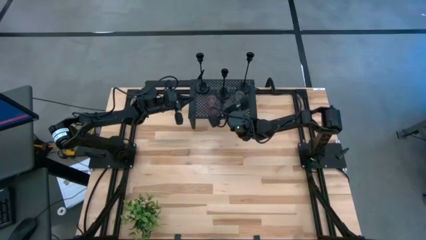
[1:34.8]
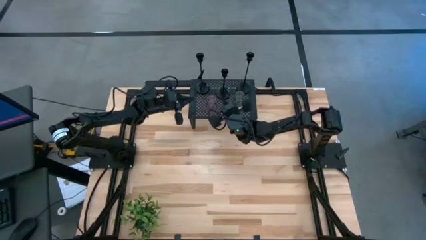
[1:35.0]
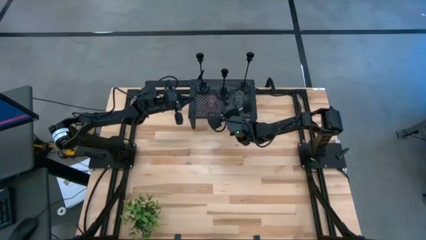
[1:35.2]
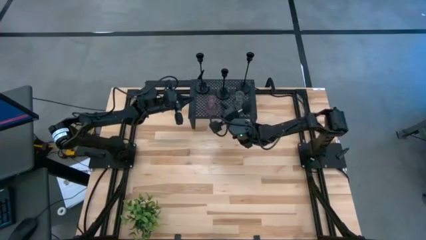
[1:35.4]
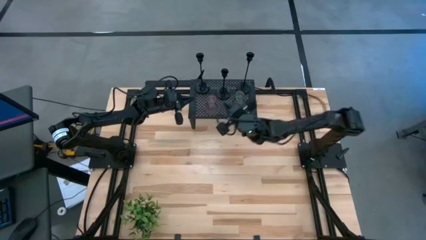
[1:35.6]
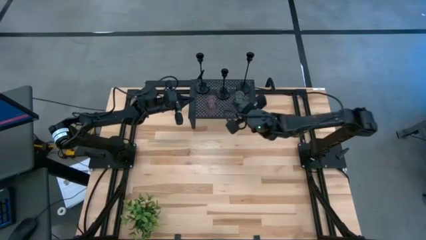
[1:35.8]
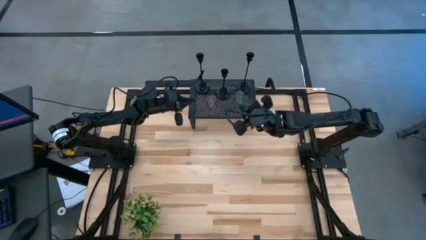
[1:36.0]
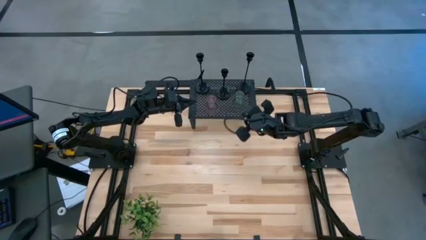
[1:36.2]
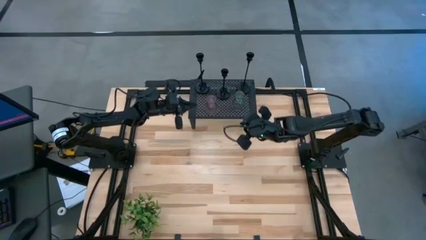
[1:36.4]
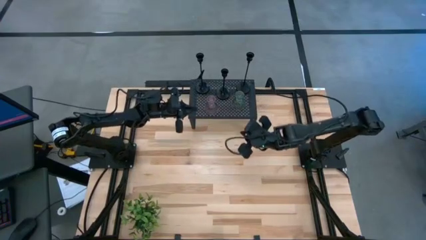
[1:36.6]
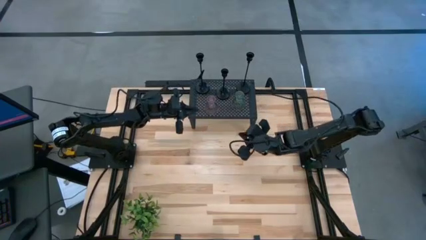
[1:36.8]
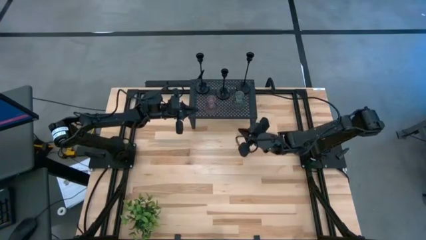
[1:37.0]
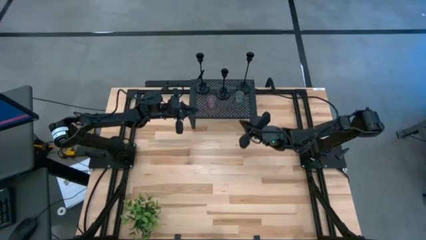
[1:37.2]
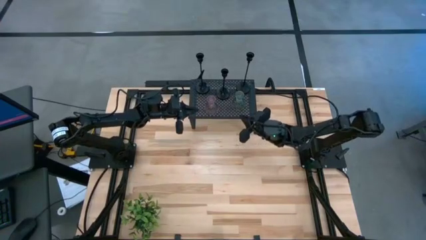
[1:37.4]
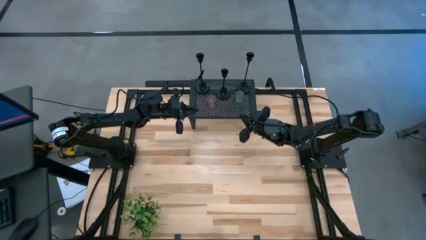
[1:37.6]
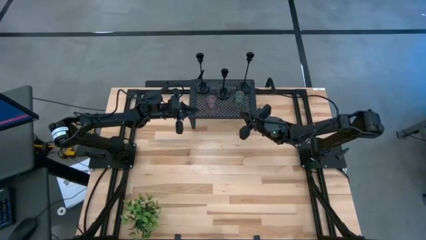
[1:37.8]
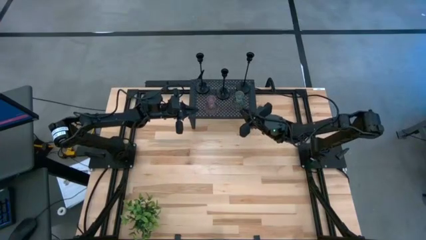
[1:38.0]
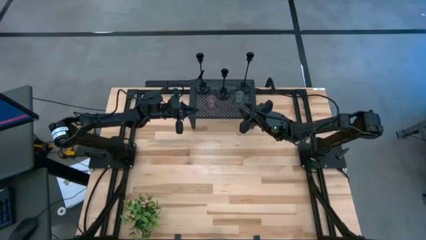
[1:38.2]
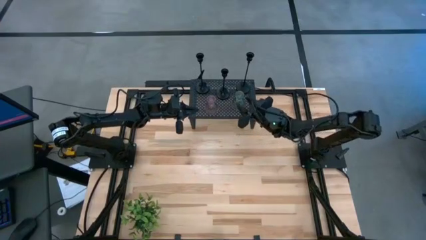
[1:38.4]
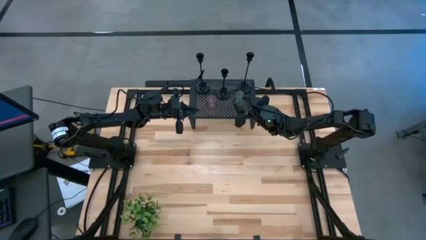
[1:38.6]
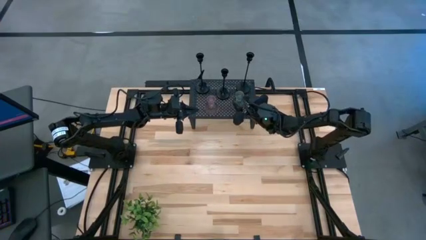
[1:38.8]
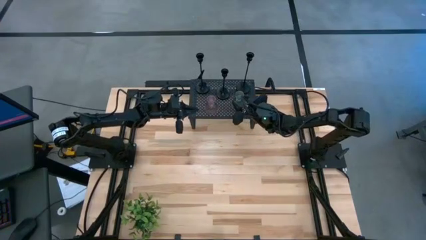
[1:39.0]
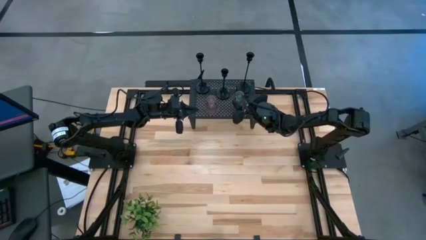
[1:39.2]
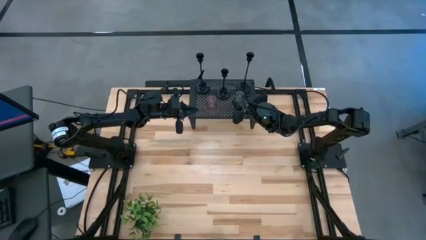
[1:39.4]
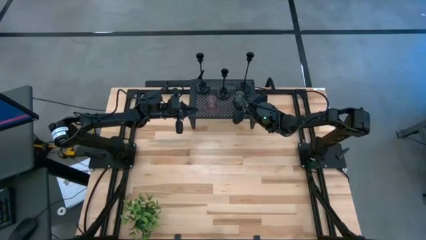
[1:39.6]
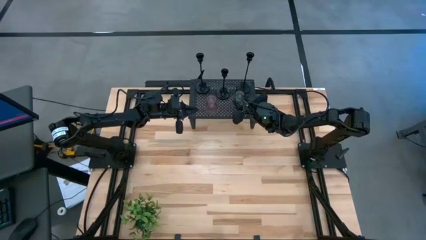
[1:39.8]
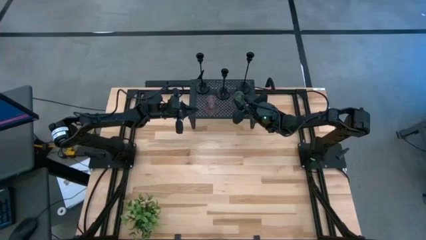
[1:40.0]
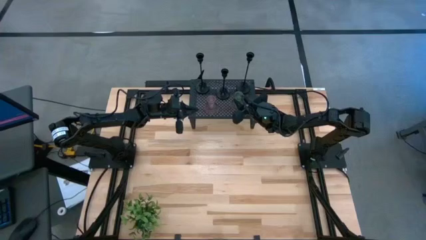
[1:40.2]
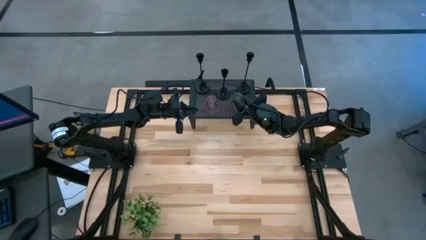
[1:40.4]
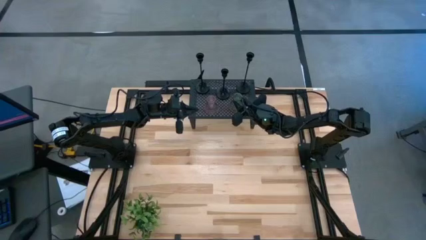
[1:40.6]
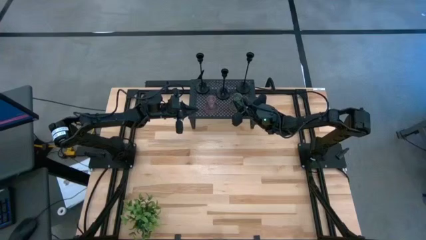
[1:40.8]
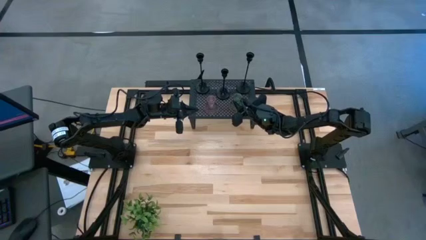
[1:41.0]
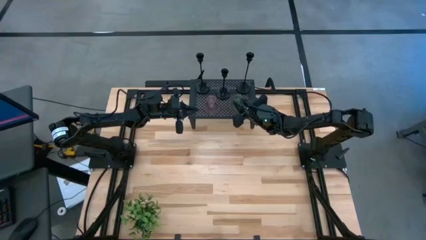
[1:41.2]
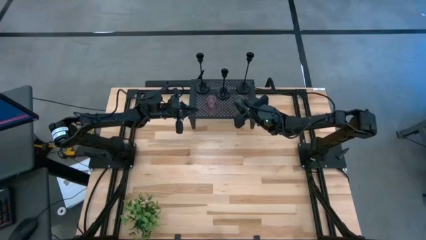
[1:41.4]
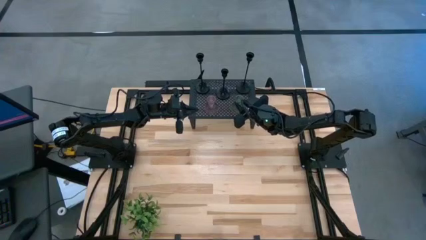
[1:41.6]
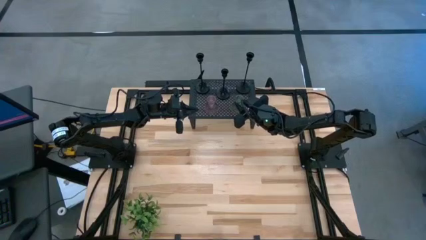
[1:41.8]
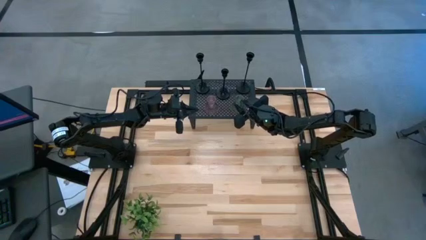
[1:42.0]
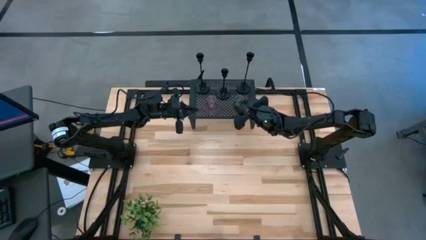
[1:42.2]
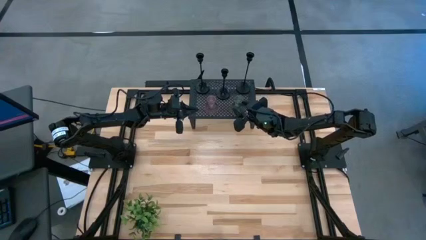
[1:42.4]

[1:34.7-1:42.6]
Task: Pick & Place candle stick holders
Adjust the green candle holder on the shelf

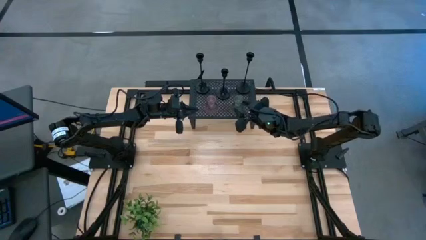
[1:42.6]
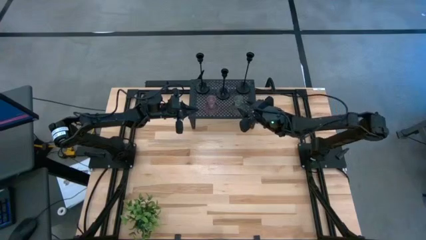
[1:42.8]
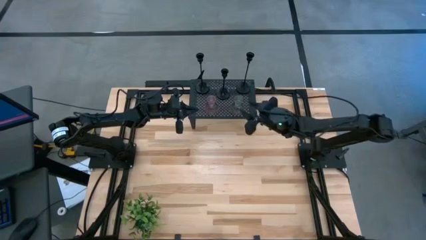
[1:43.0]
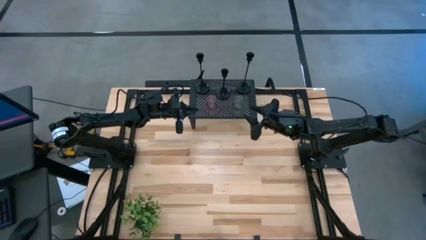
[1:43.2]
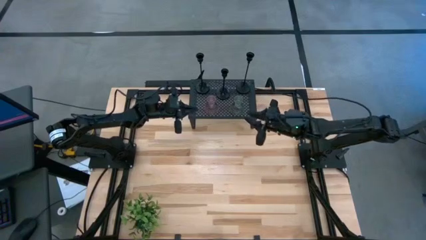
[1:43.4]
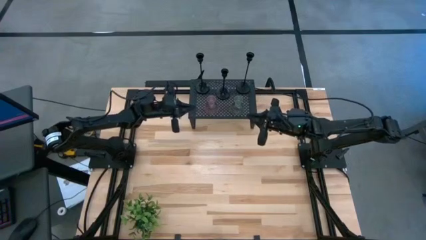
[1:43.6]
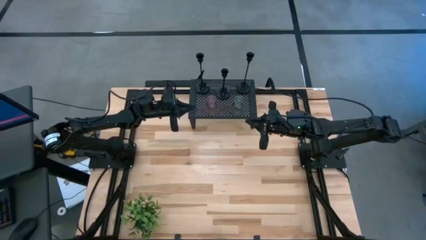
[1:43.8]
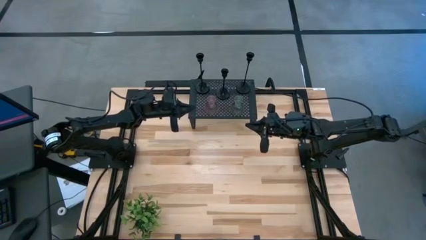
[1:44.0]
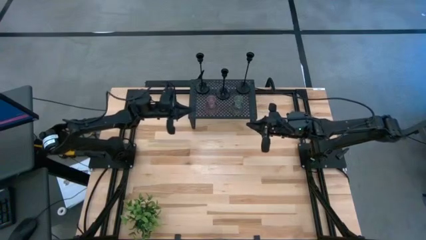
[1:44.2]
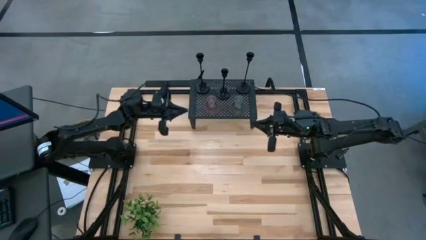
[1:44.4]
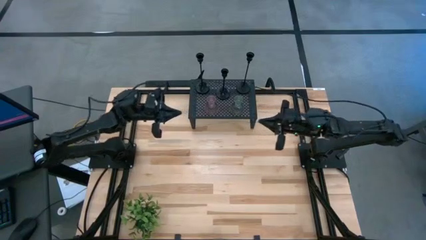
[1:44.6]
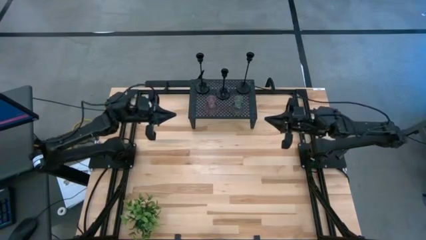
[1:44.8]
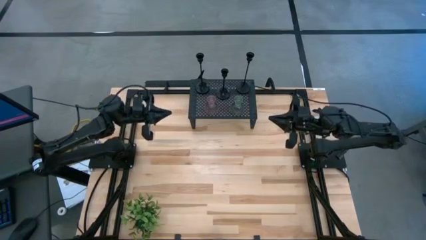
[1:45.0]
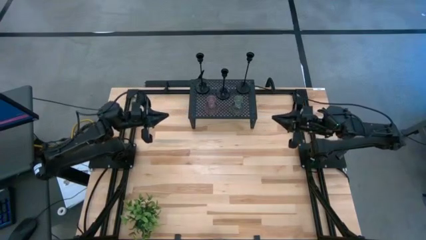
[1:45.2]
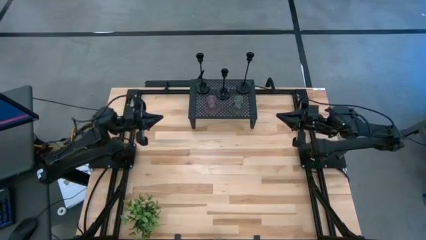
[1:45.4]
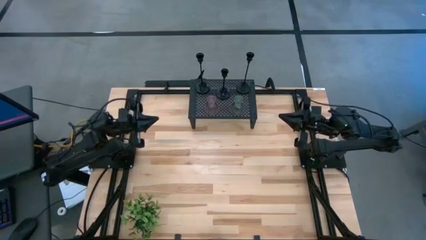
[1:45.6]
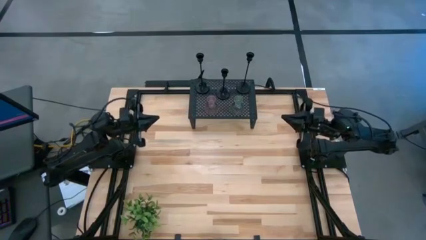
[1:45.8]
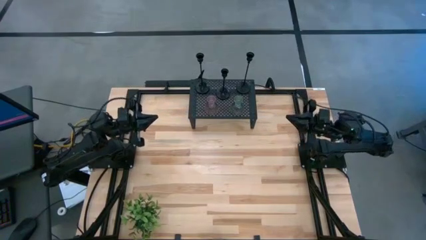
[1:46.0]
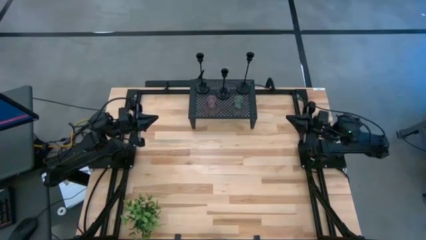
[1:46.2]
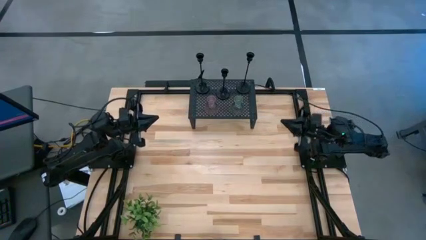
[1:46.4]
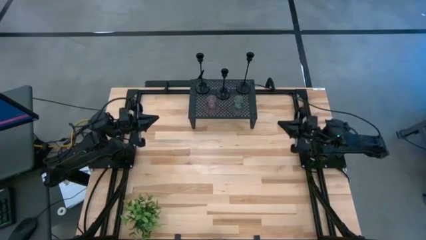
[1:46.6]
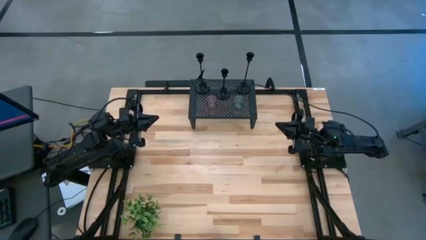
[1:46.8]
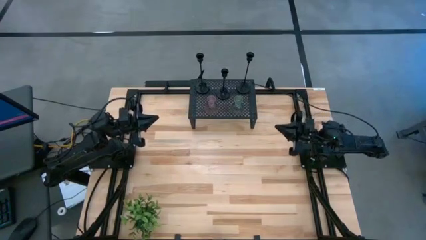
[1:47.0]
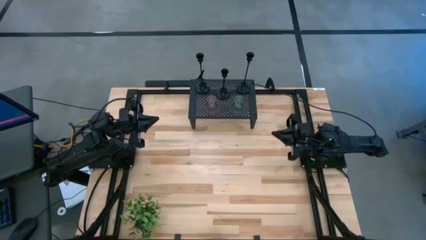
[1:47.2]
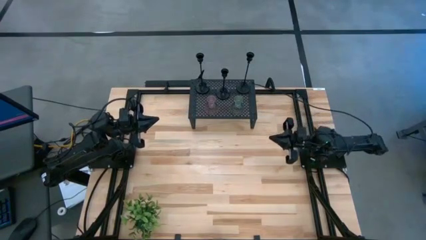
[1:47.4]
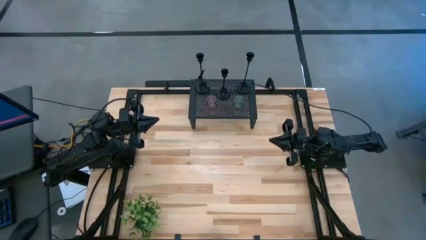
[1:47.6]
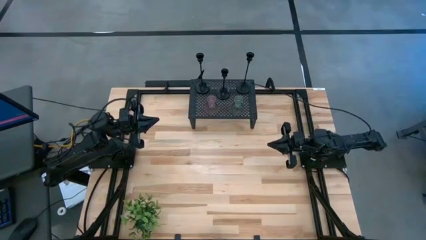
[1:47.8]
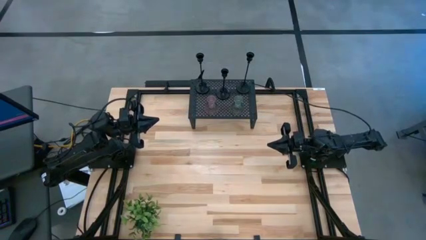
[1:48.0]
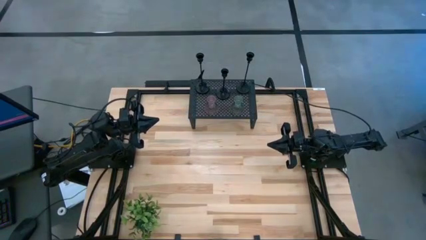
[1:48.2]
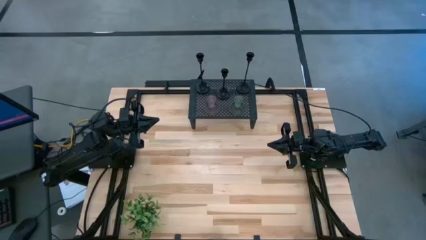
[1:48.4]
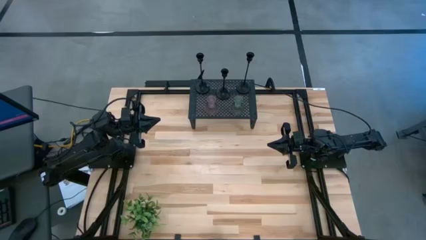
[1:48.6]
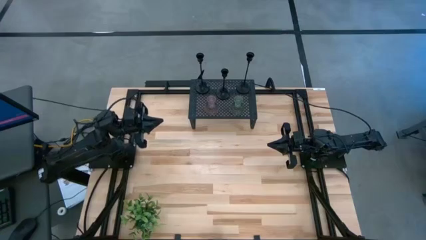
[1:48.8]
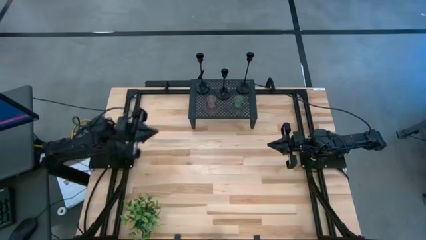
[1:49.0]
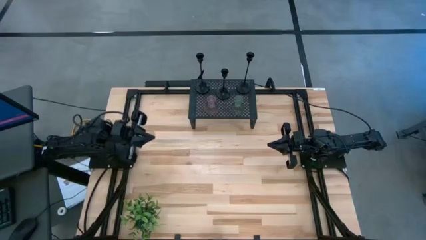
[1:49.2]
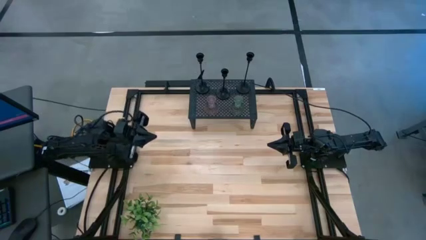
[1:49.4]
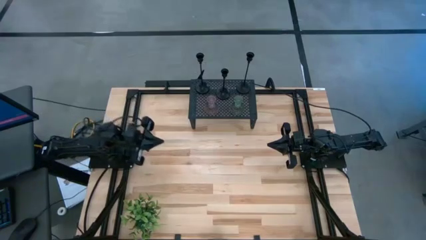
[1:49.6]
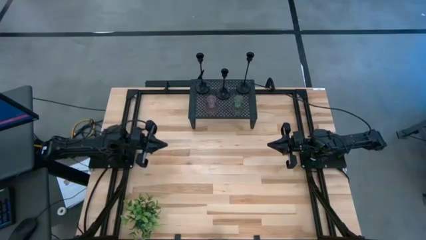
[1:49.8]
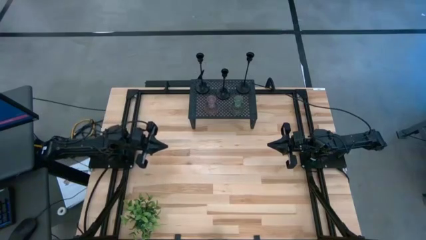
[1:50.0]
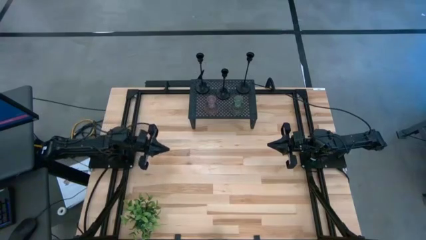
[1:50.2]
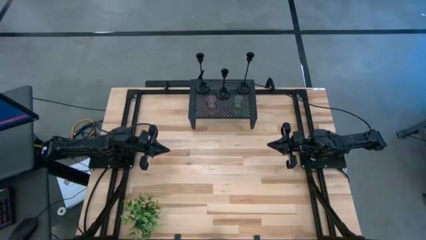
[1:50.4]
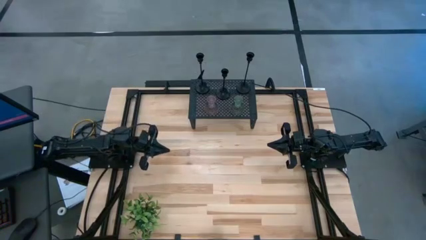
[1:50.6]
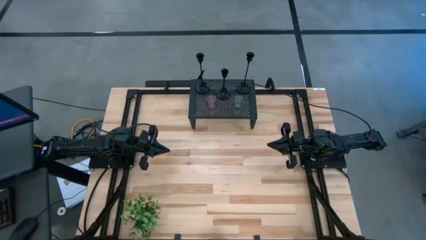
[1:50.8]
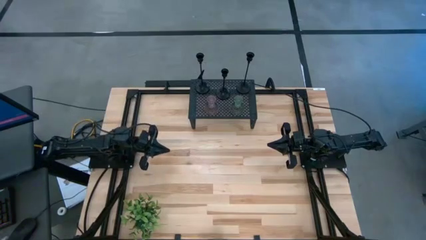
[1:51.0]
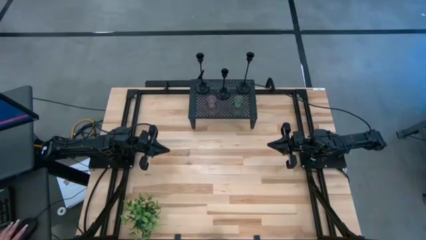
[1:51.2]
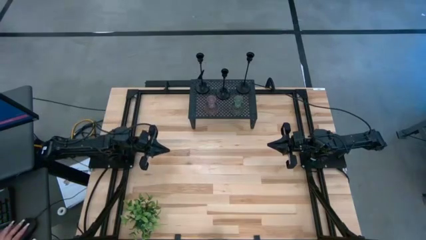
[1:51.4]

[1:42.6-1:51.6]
Return to Home Position
